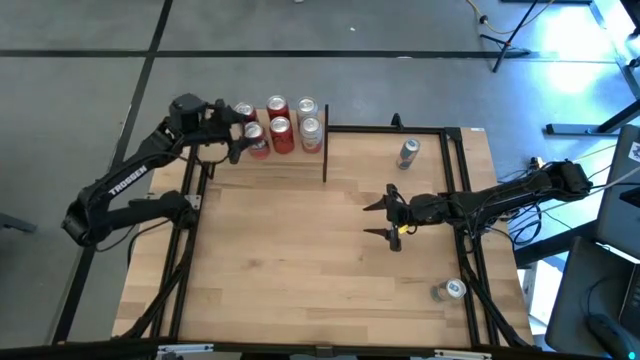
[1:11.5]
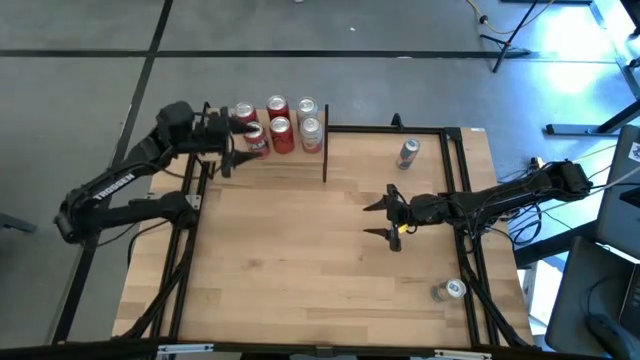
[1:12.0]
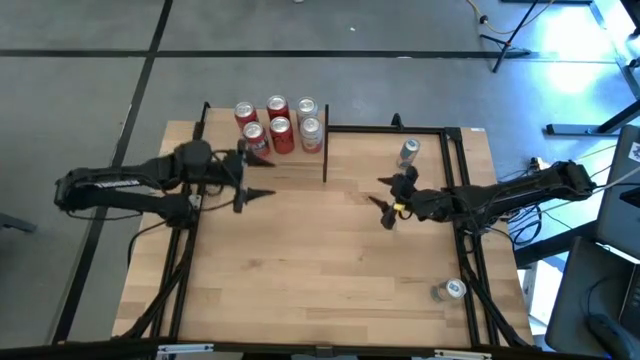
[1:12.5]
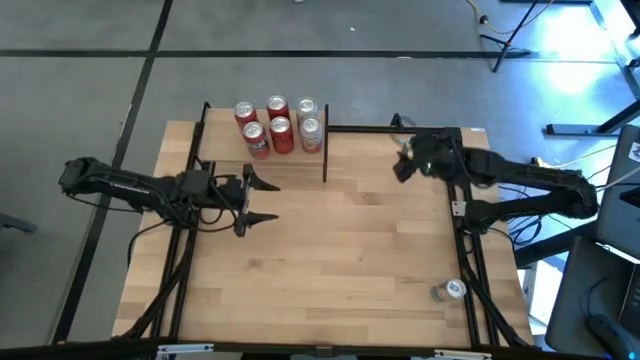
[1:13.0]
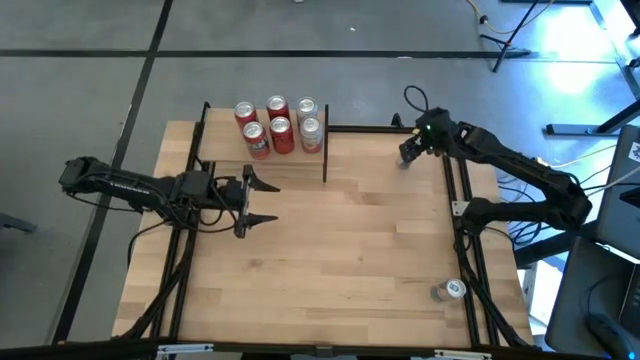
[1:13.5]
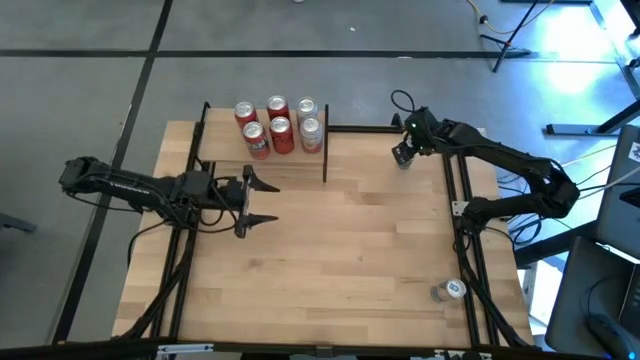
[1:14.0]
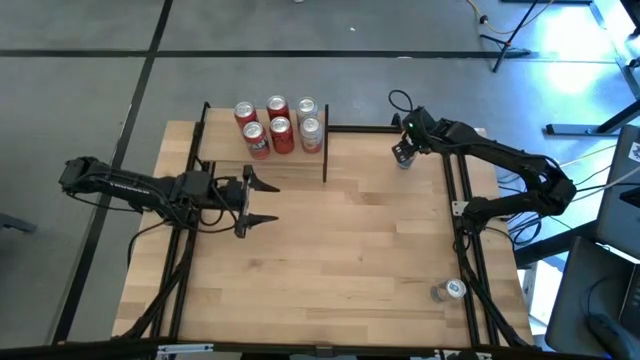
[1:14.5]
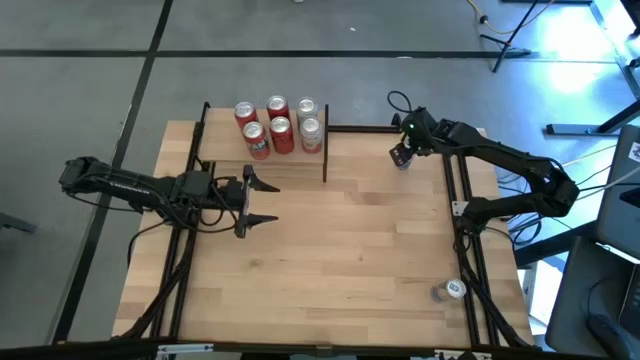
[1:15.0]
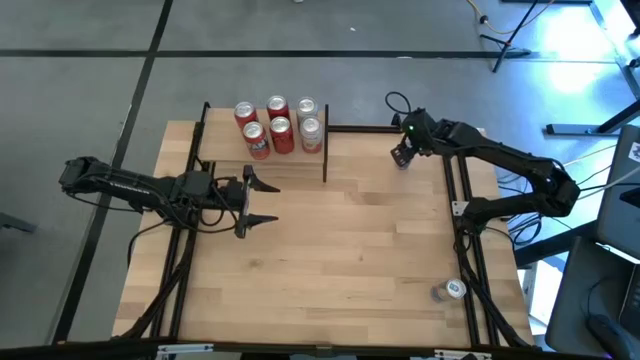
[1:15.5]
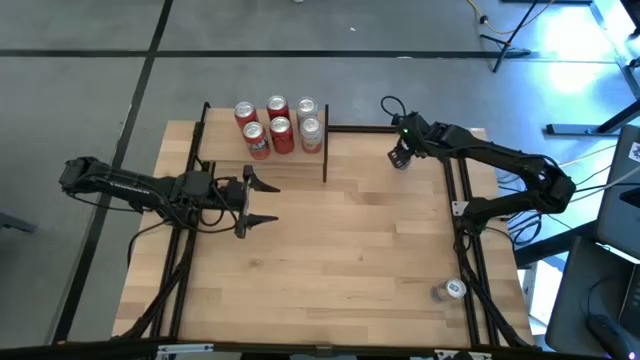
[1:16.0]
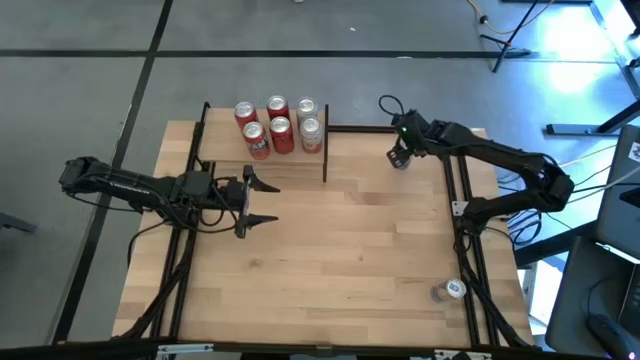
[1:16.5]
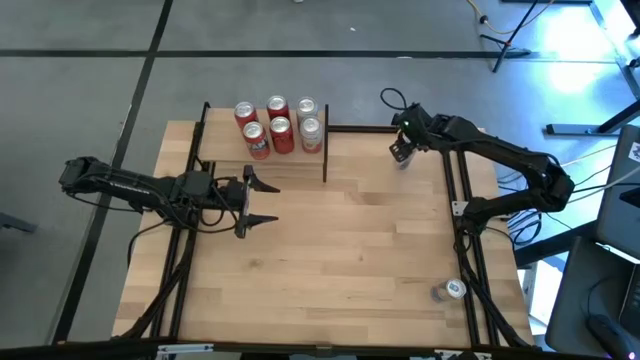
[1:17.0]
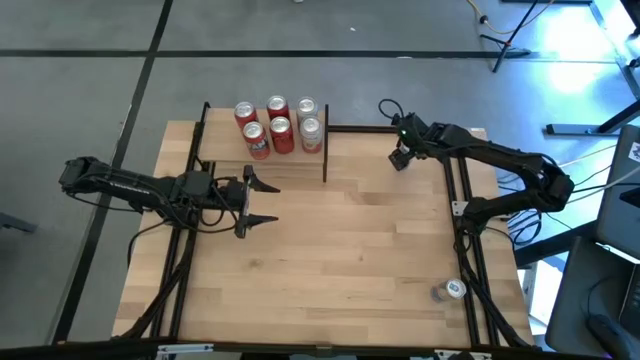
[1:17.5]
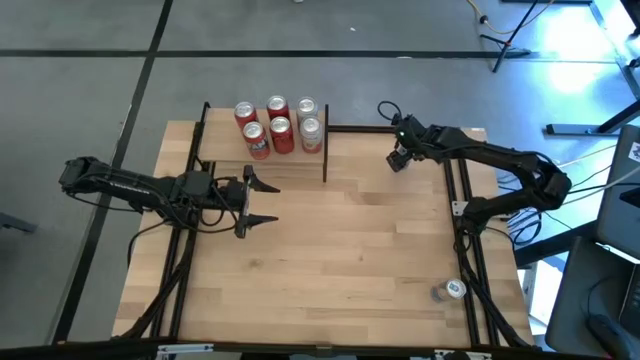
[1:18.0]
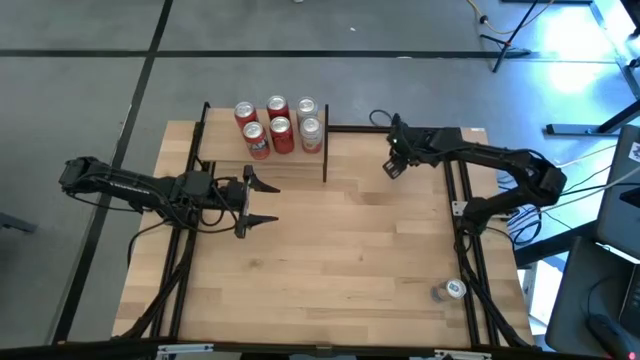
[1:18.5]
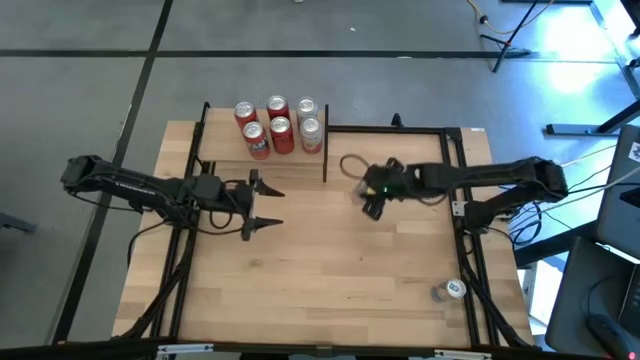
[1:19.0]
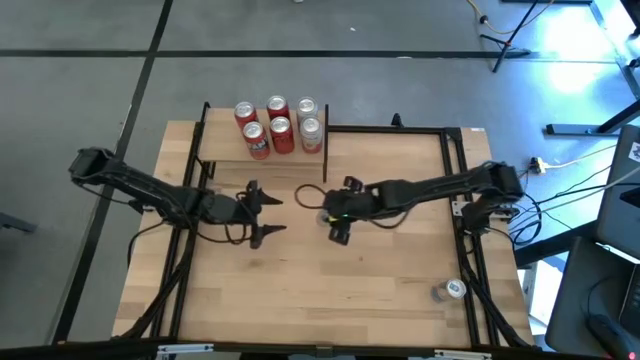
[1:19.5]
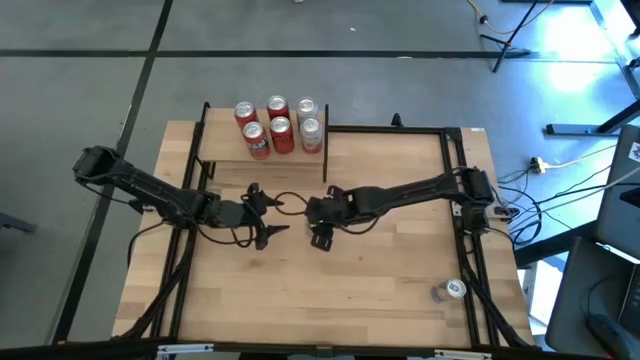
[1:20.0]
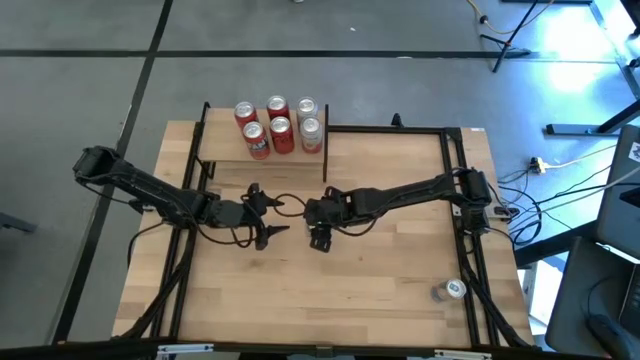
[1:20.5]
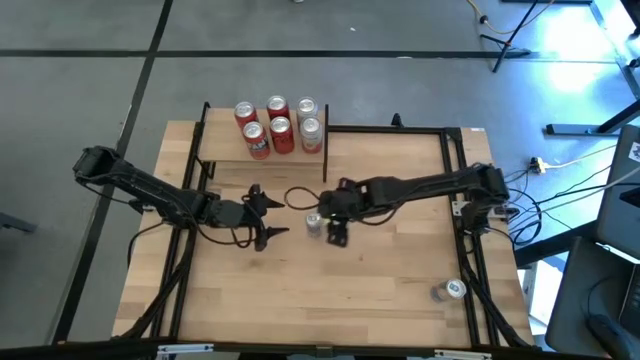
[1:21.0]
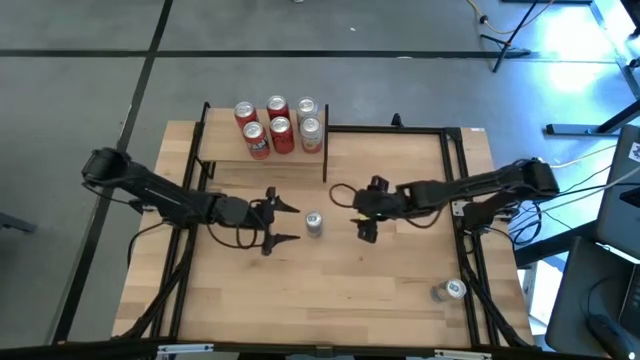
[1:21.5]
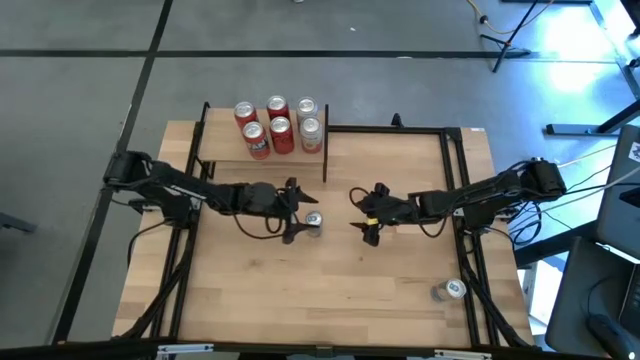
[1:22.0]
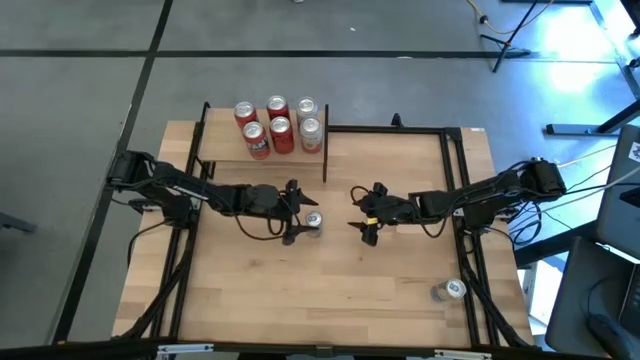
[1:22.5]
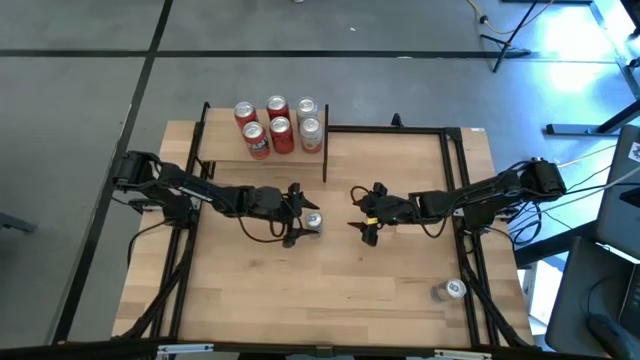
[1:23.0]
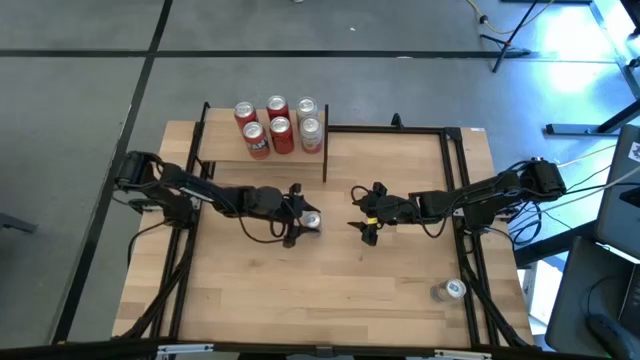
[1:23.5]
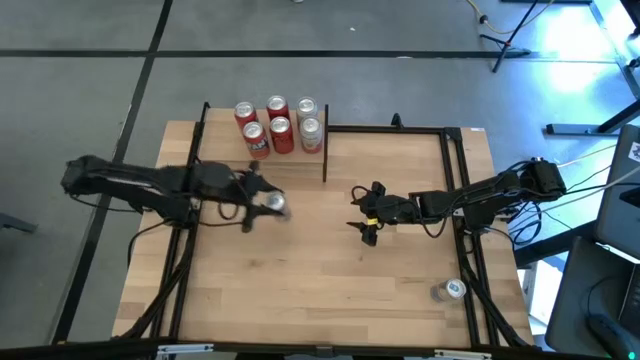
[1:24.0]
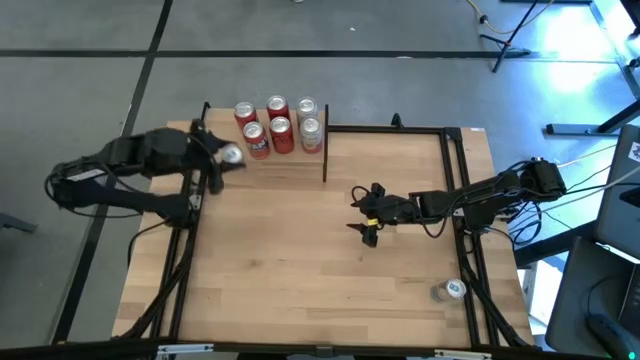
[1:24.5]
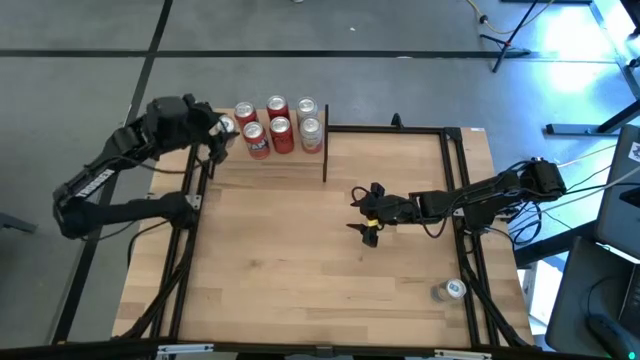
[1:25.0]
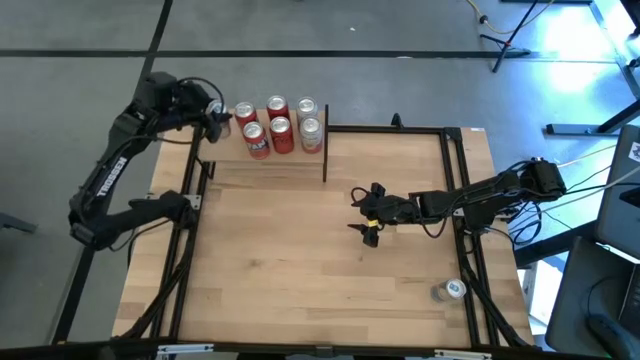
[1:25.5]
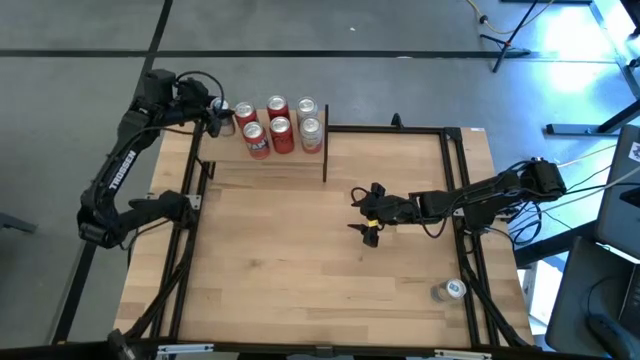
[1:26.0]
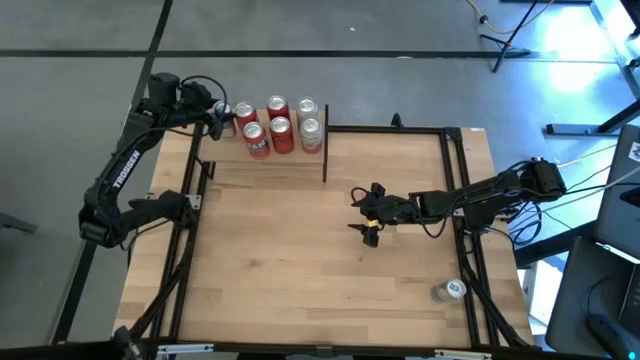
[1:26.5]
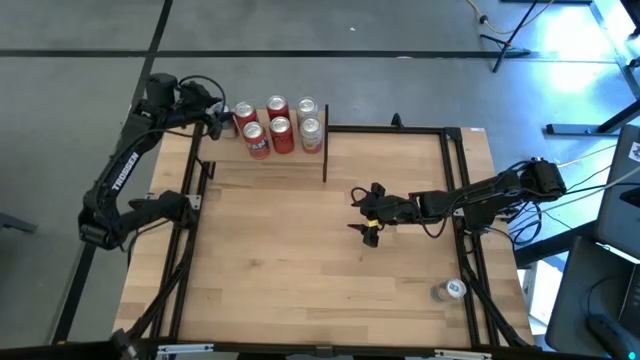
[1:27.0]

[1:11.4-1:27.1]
Task: Place canned beverage on shelf
Put the top blue soda can on the shelf

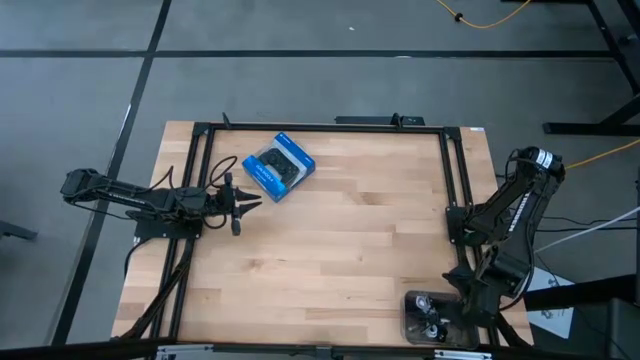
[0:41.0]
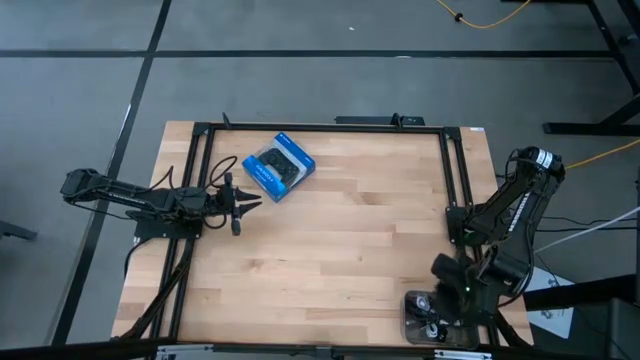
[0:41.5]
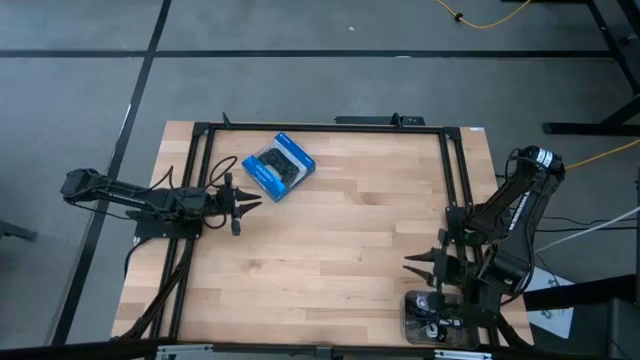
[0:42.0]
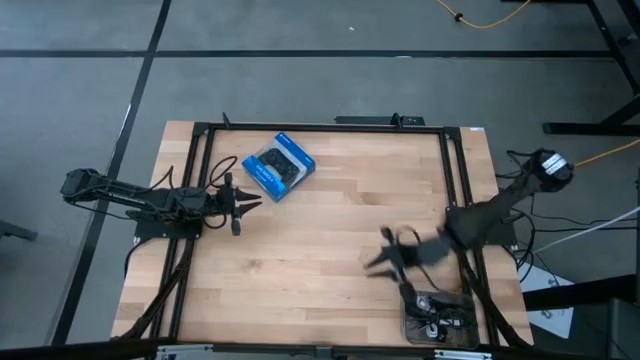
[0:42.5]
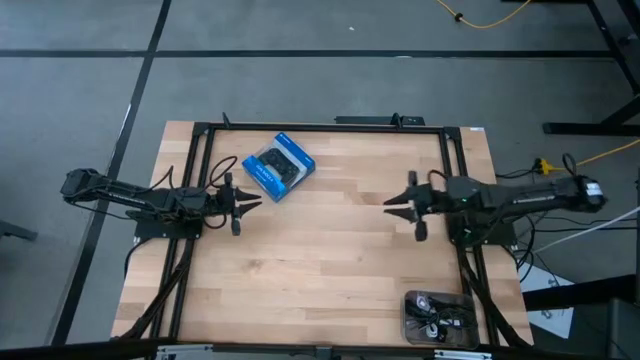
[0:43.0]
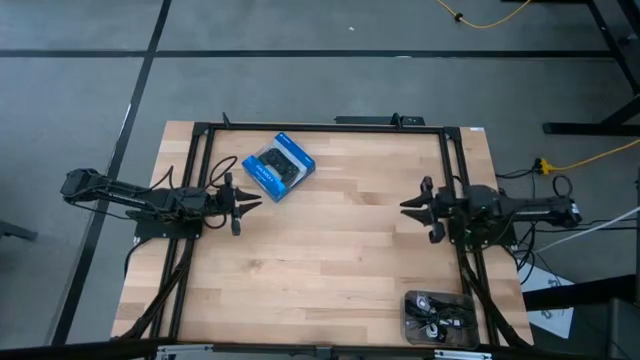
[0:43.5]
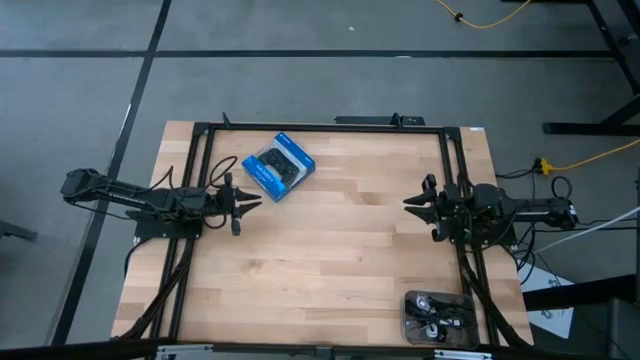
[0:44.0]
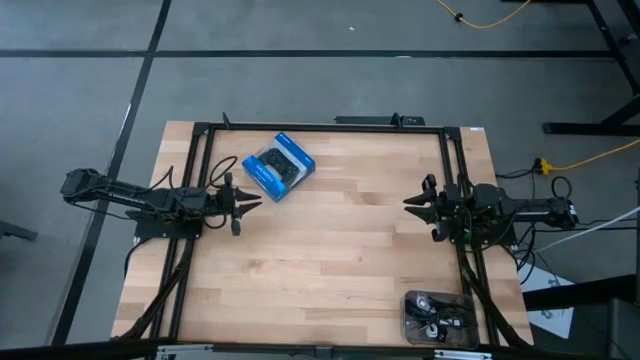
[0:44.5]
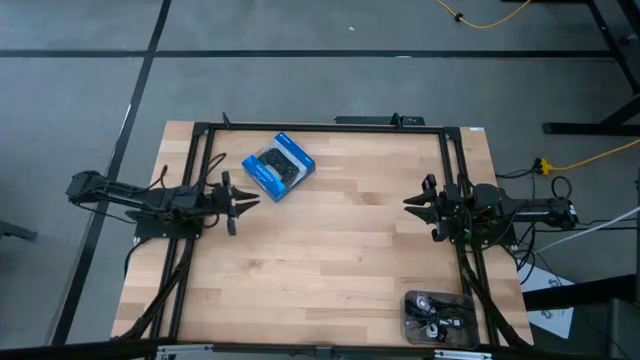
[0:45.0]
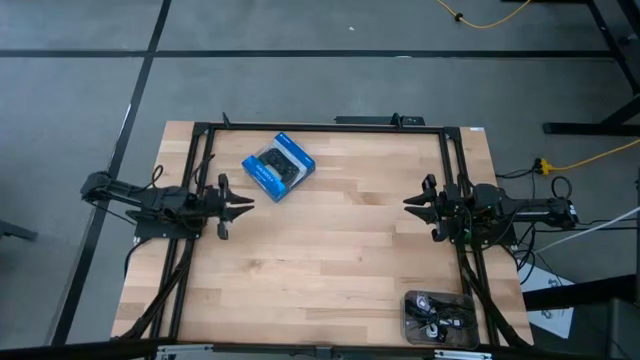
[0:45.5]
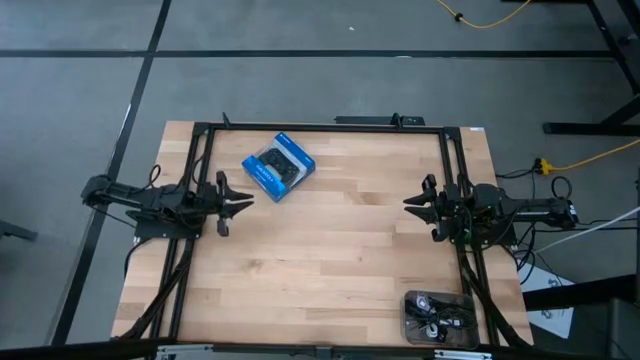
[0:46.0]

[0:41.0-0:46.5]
Task: Pick and place USB-C Cables
Return to Home Position
